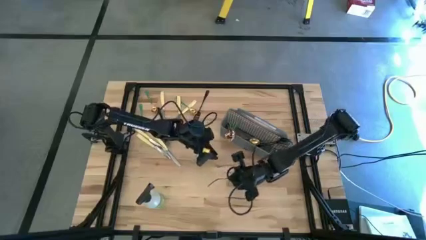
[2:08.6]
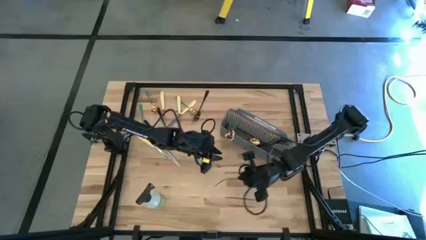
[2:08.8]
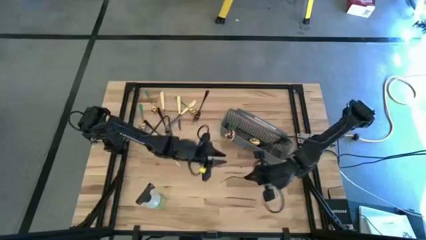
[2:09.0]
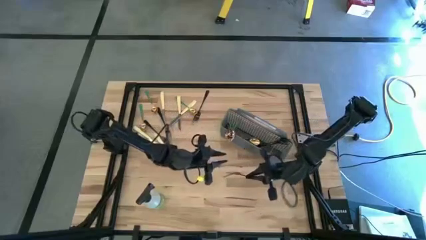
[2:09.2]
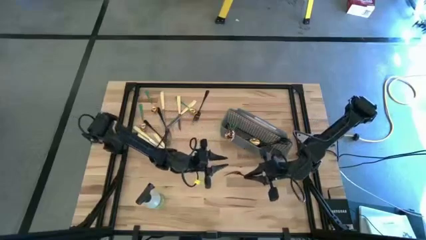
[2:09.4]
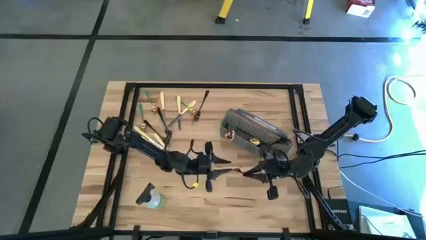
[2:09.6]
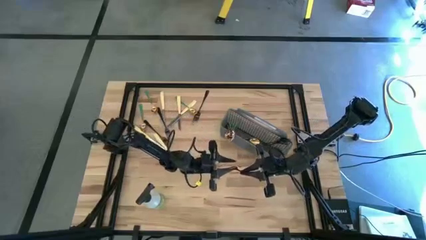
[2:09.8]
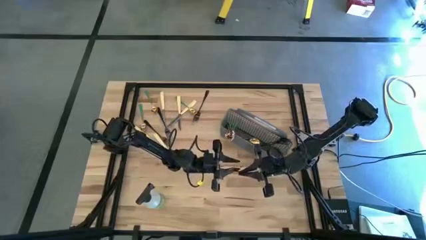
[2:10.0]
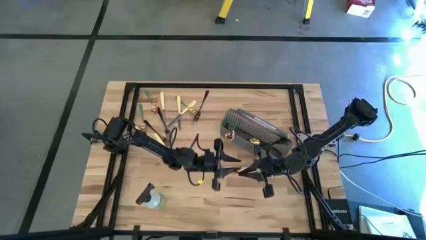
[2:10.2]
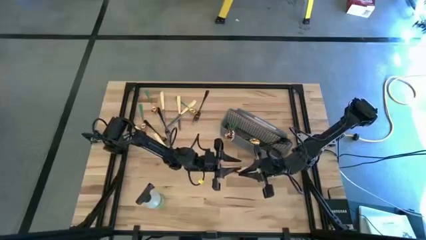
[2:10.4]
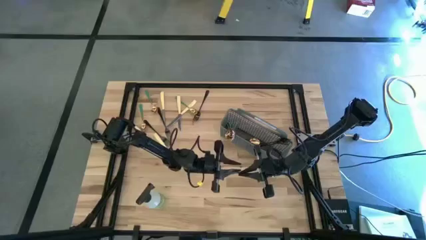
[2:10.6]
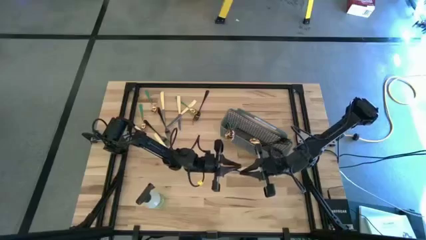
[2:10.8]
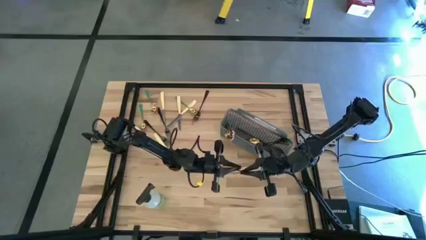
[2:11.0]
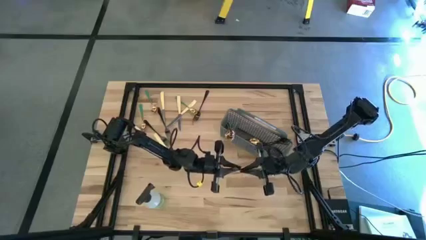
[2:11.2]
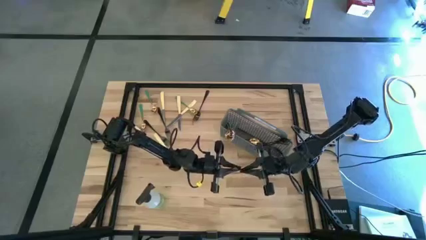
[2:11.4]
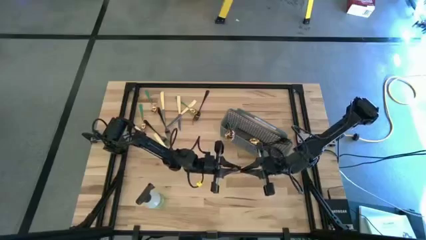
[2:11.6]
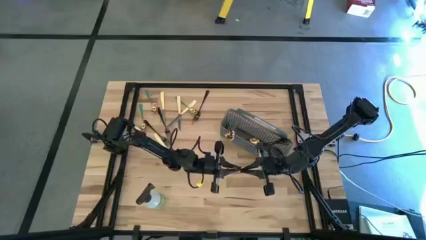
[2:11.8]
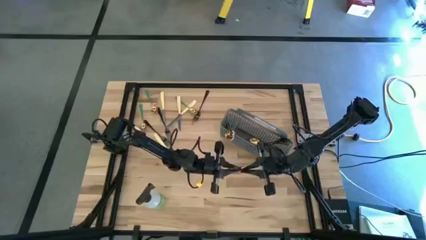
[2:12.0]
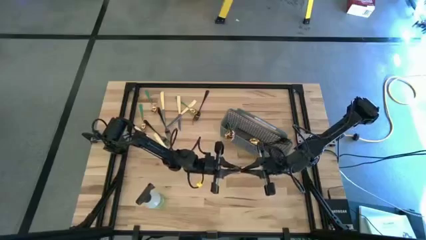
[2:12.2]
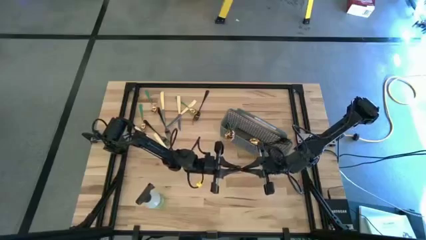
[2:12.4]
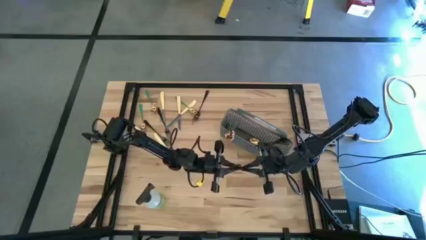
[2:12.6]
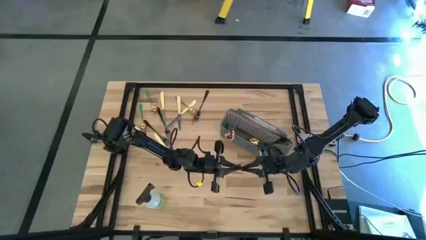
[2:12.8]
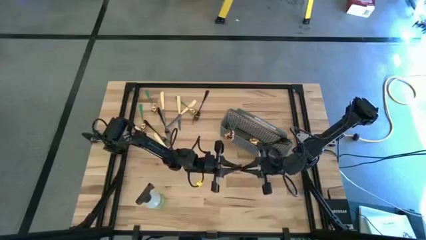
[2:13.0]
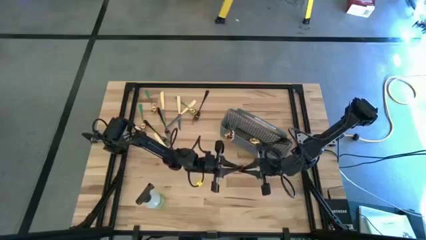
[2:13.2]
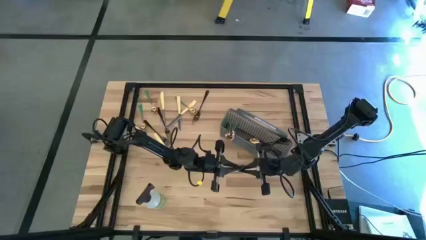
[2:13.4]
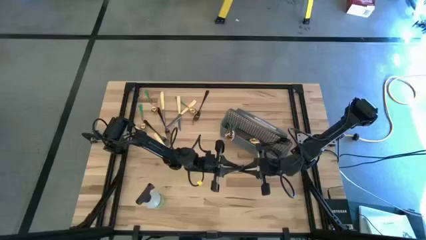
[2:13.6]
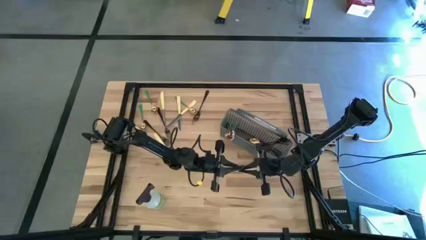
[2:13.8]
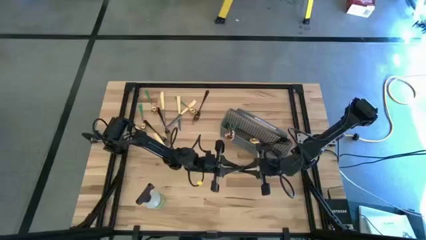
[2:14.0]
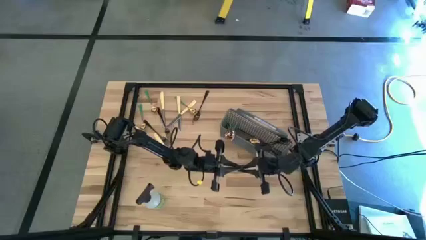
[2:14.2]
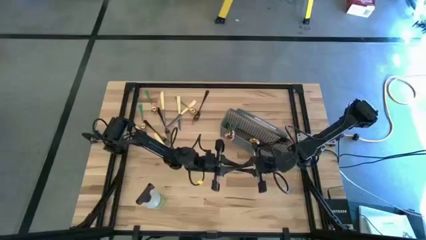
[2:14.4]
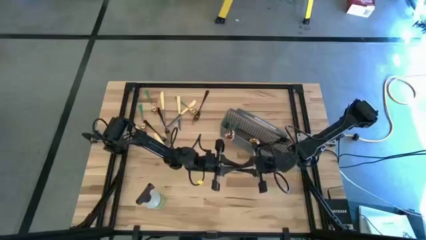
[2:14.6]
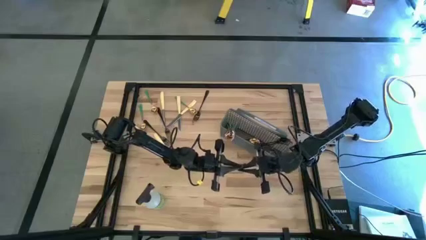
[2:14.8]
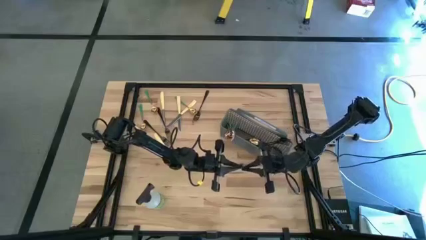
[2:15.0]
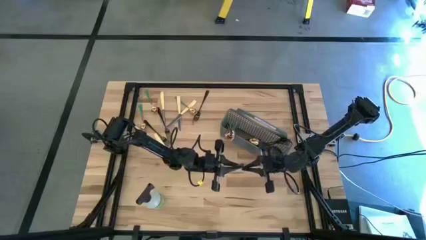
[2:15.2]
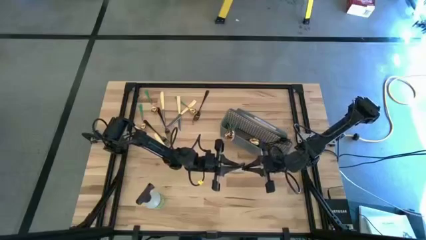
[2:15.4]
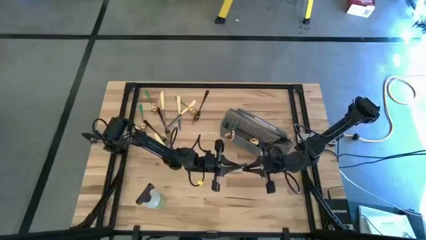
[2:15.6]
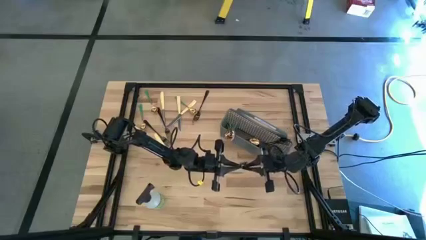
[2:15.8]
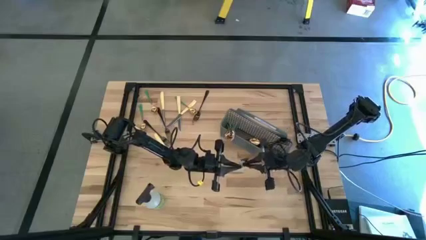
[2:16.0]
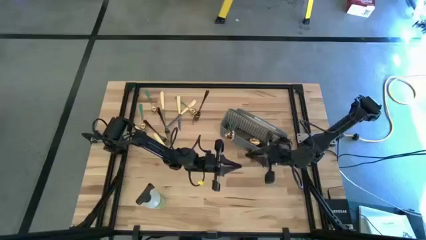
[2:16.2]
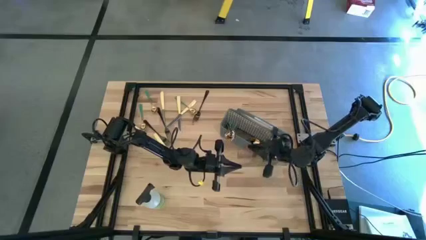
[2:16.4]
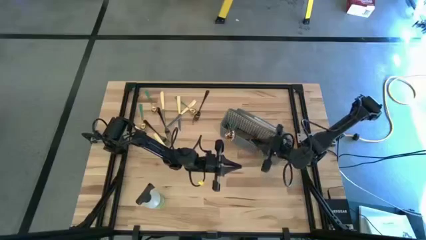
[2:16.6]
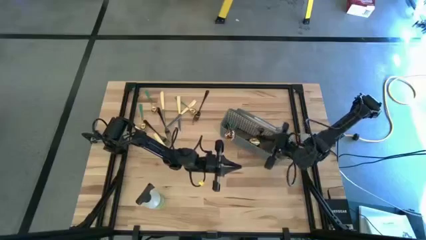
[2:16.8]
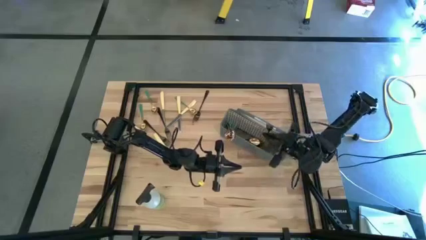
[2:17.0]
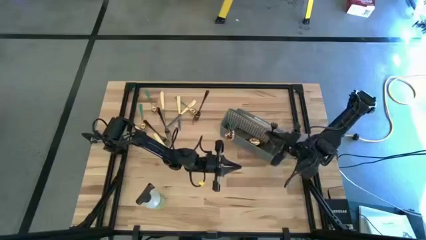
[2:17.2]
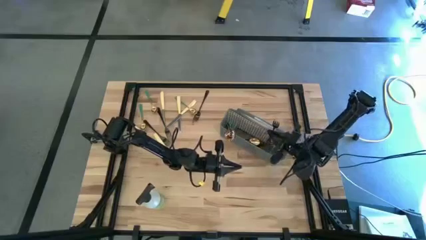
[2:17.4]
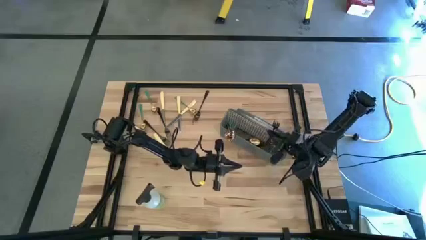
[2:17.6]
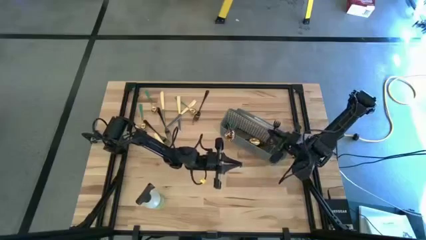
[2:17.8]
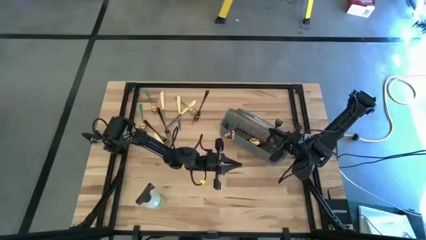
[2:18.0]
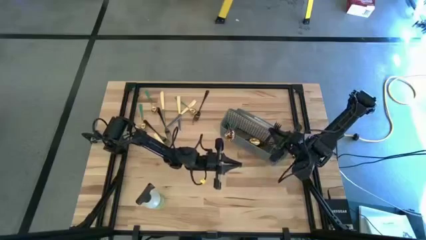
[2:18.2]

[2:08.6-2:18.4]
Task: Sort silverware
Put the black fork into the cutlery rack

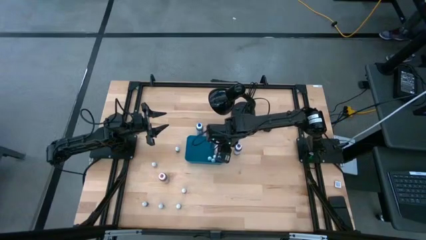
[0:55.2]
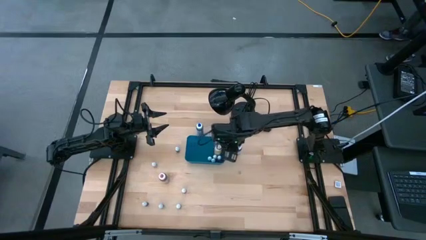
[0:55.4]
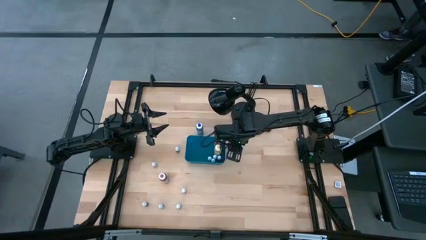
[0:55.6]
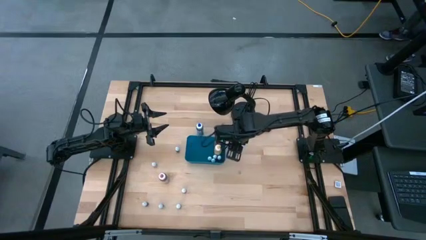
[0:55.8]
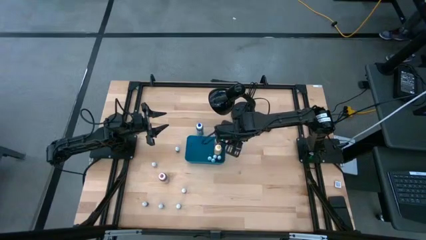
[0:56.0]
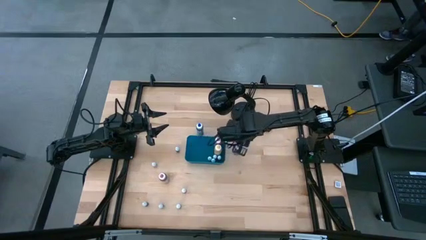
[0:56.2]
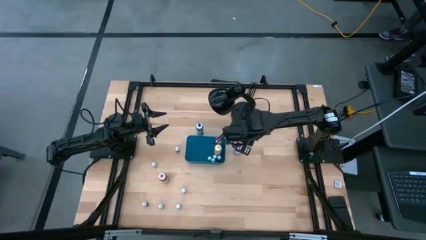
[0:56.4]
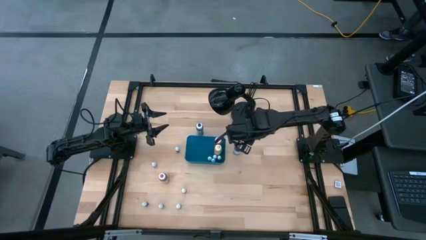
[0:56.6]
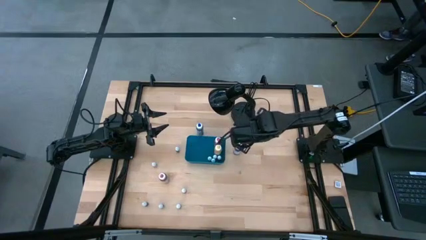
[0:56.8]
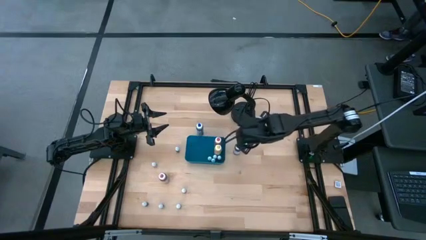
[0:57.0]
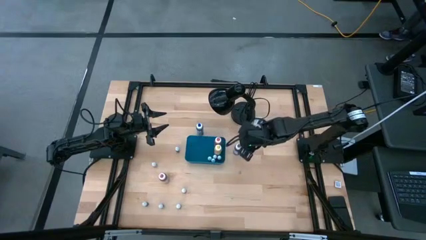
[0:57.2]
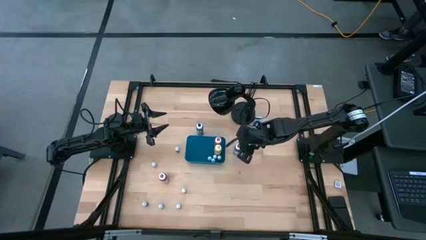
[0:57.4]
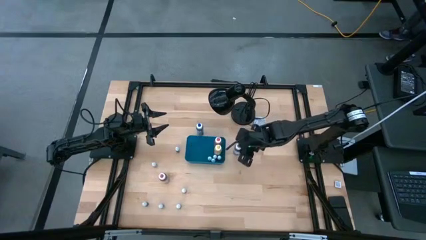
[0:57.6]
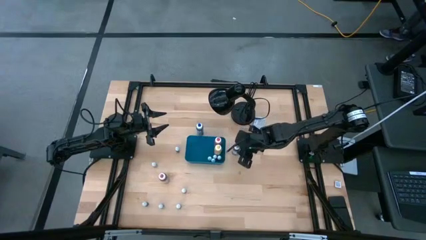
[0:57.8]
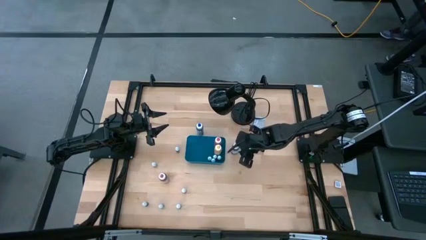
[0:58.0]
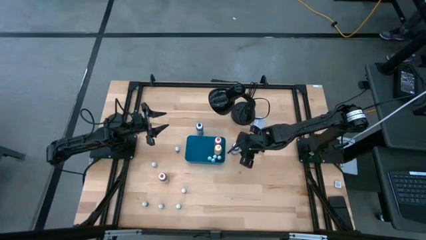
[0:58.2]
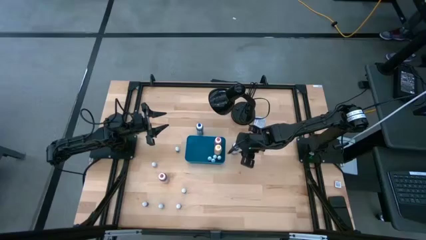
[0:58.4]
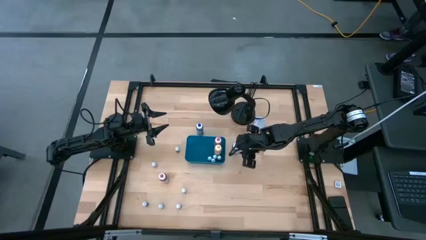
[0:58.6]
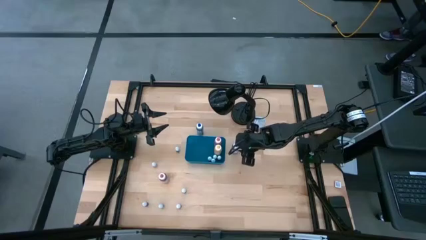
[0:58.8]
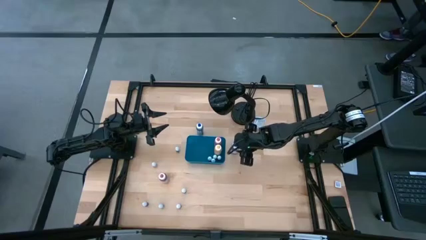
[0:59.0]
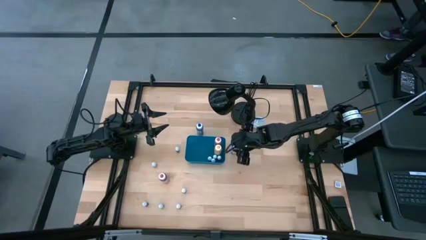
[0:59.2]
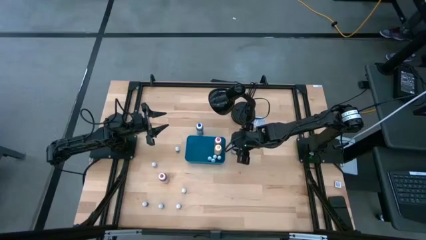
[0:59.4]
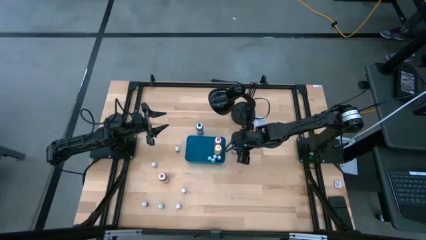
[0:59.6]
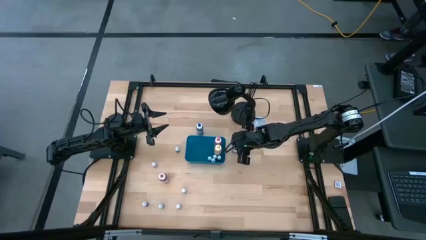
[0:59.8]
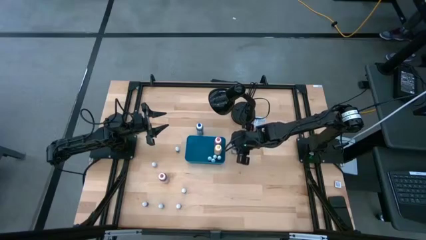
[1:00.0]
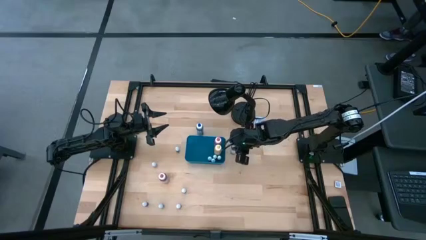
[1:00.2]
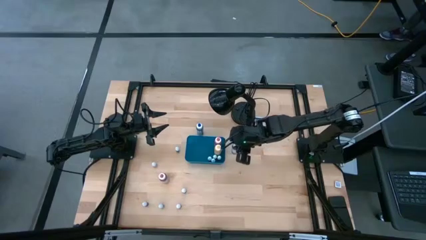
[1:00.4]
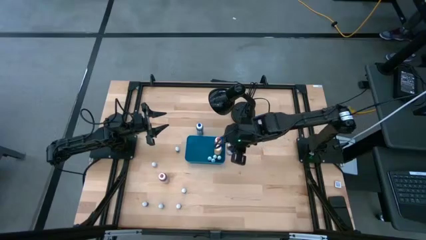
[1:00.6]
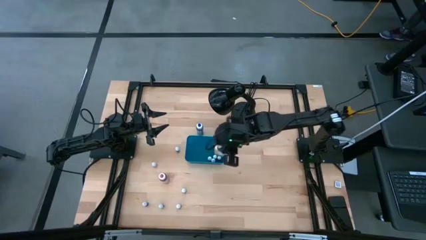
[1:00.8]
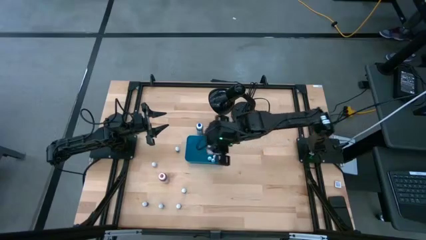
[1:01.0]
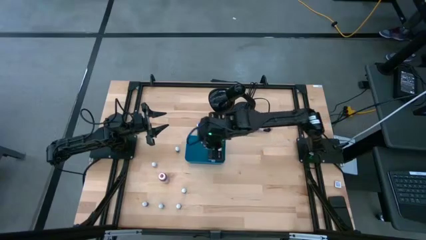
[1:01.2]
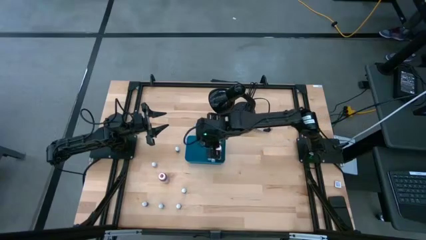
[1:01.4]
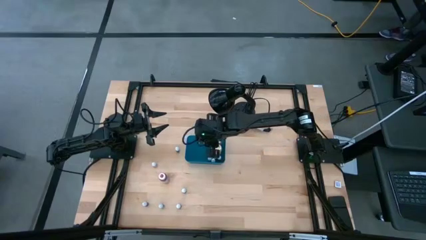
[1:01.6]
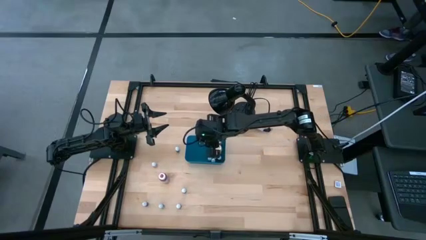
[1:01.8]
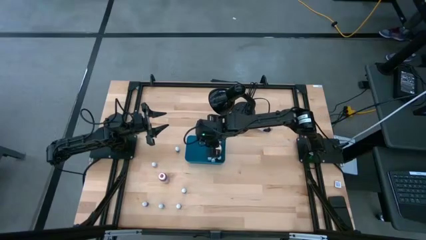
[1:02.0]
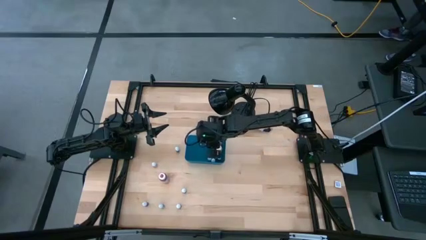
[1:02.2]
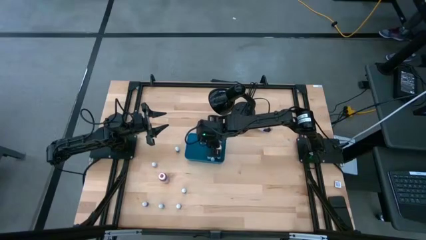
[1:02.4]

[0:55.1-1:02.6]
Task: Pick & Place food coloring
Put the large violet food coloring bottle into the blue bin
